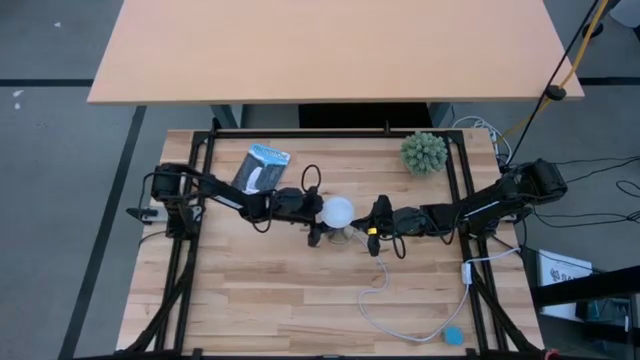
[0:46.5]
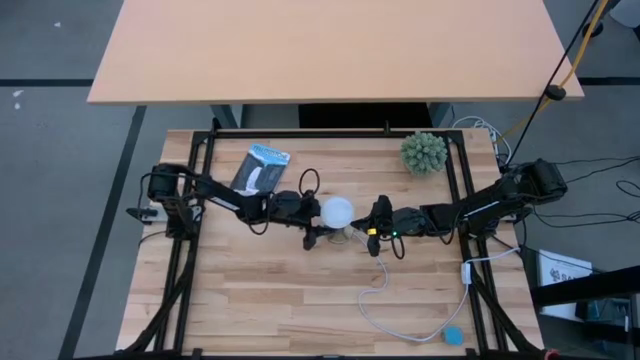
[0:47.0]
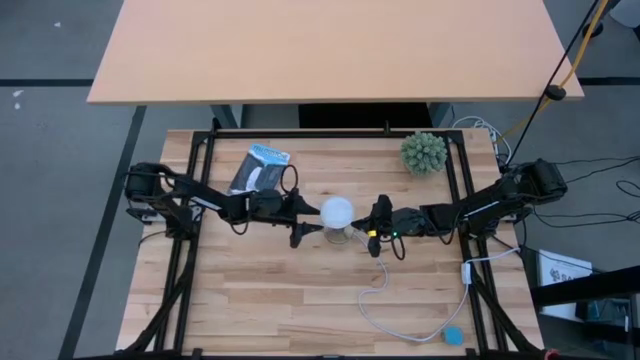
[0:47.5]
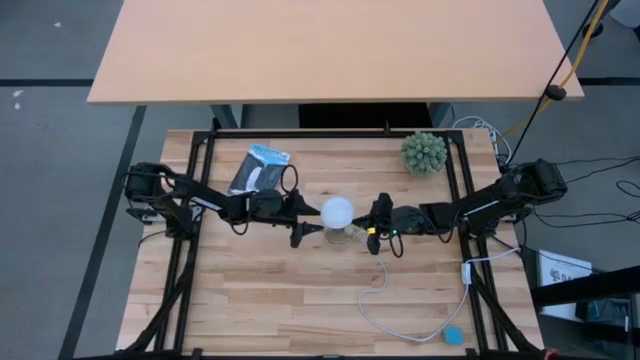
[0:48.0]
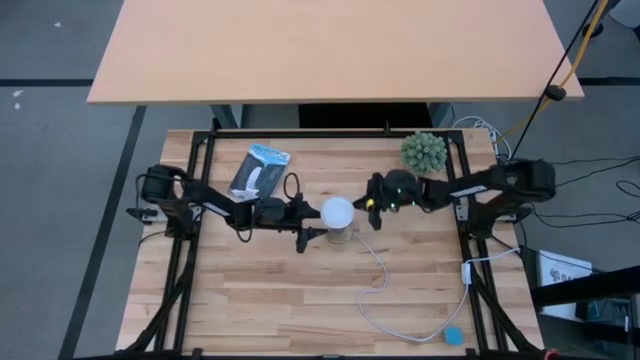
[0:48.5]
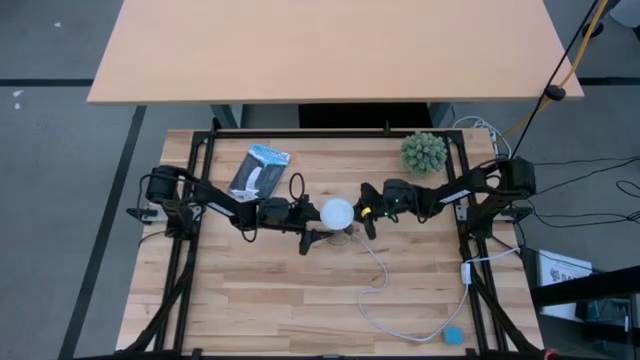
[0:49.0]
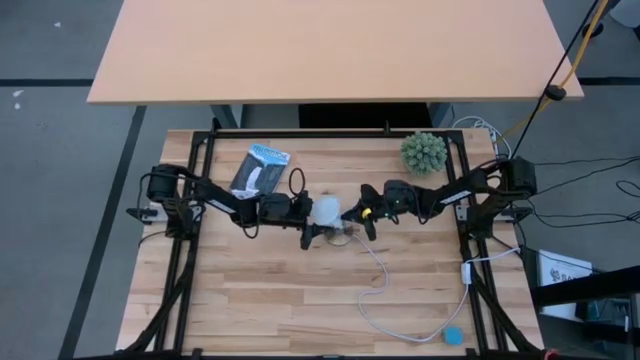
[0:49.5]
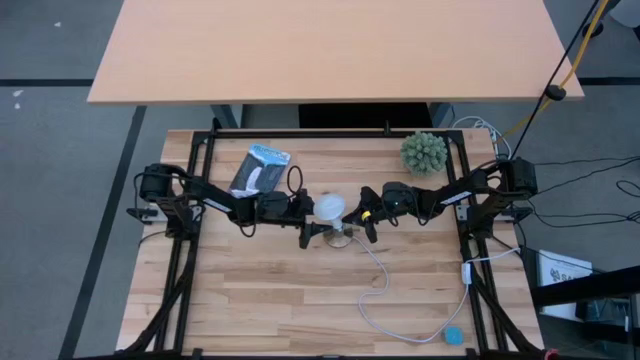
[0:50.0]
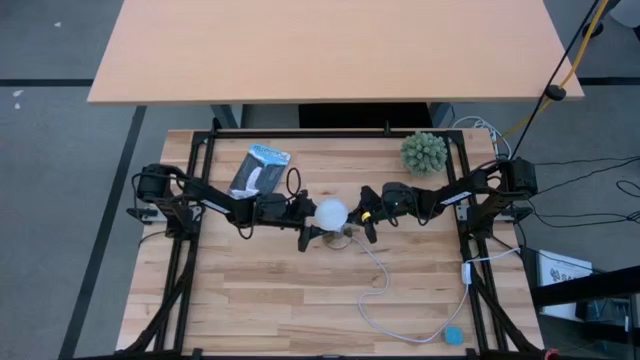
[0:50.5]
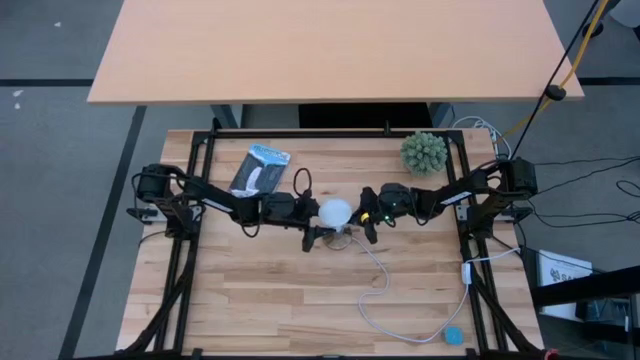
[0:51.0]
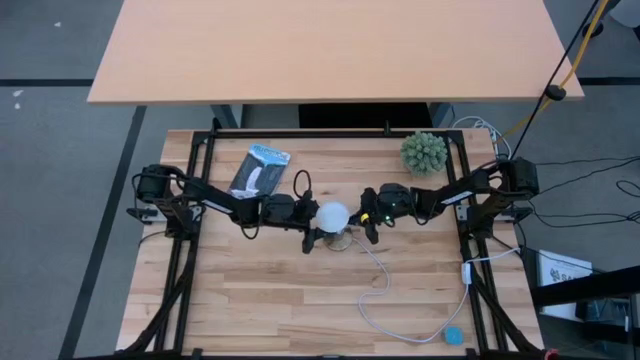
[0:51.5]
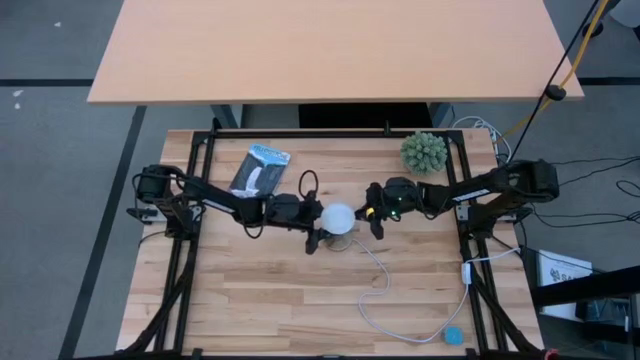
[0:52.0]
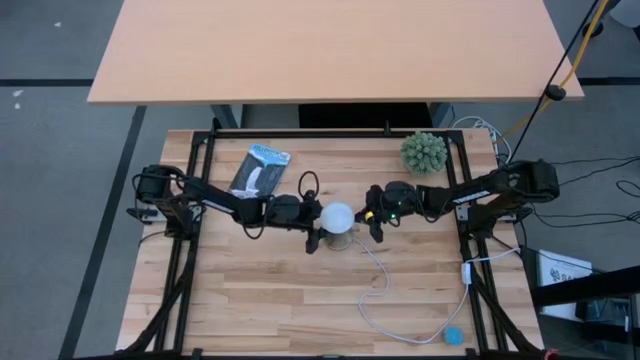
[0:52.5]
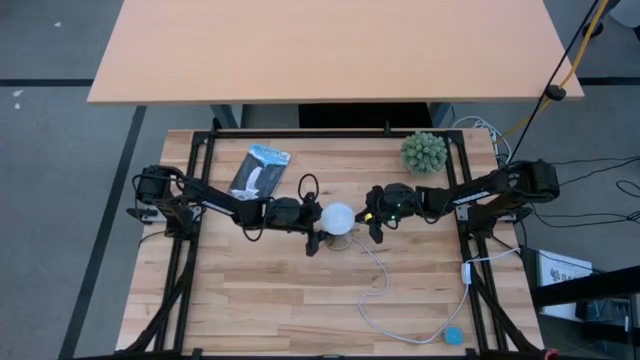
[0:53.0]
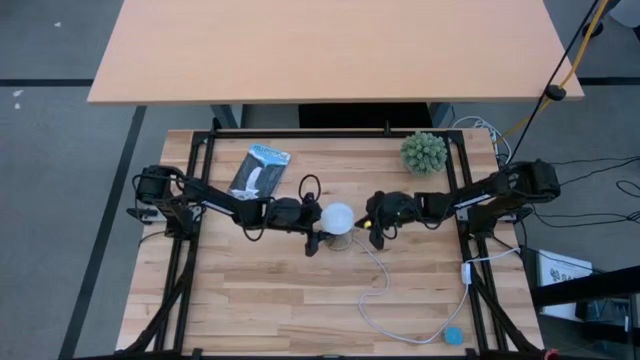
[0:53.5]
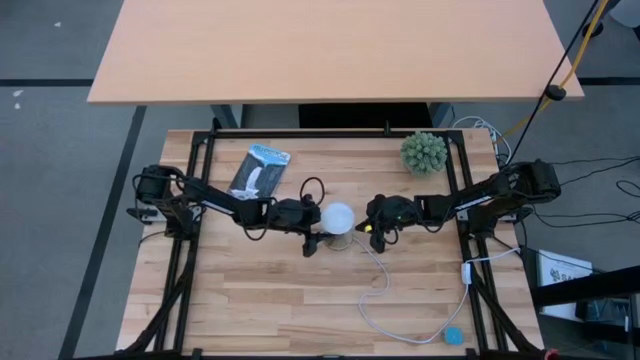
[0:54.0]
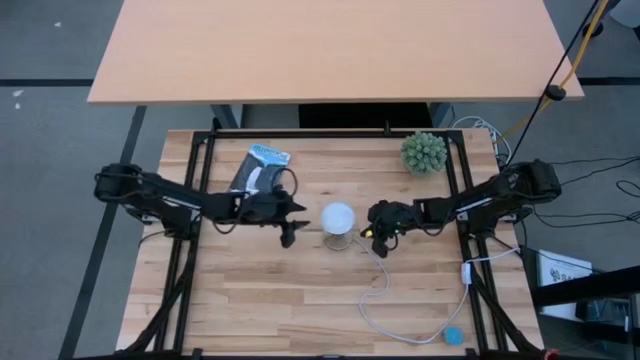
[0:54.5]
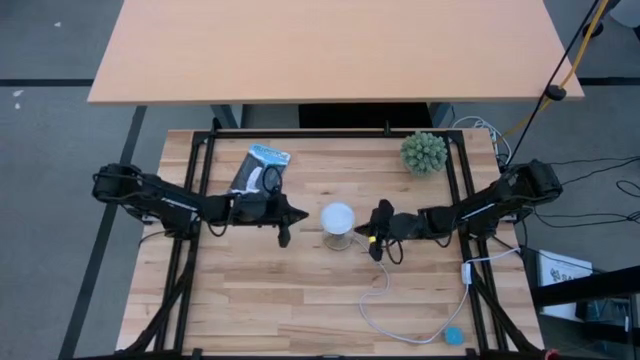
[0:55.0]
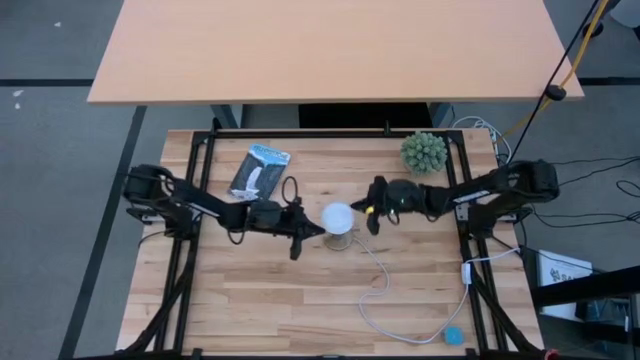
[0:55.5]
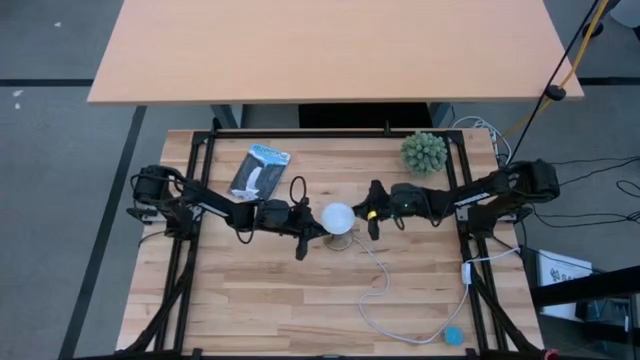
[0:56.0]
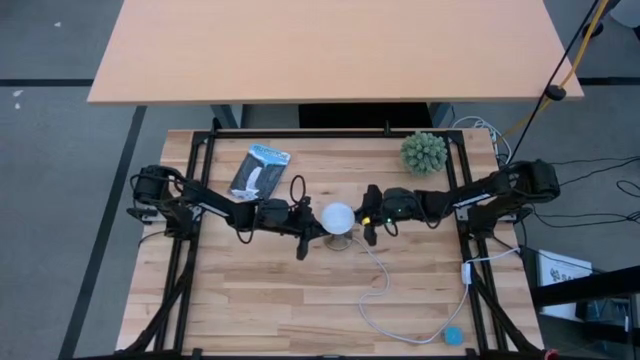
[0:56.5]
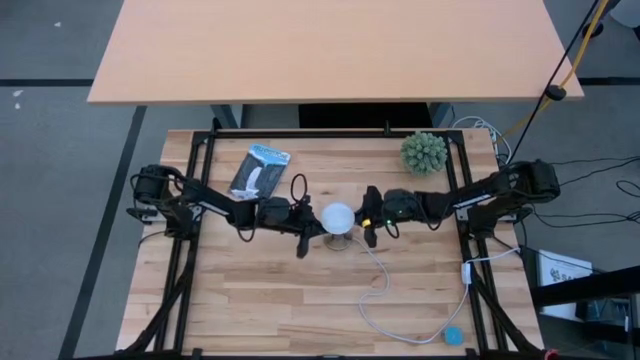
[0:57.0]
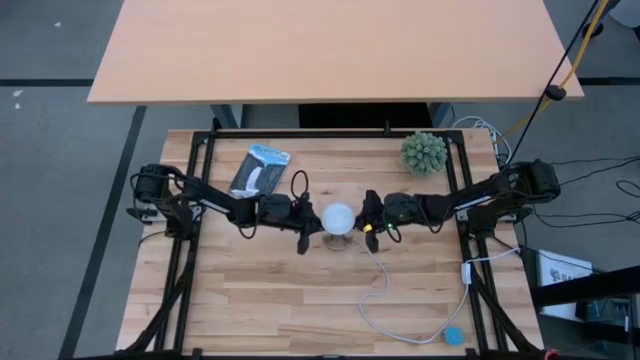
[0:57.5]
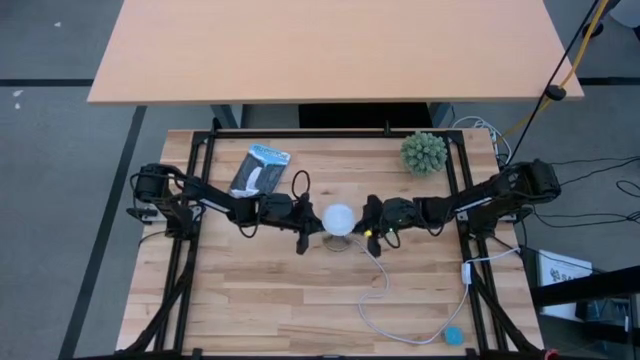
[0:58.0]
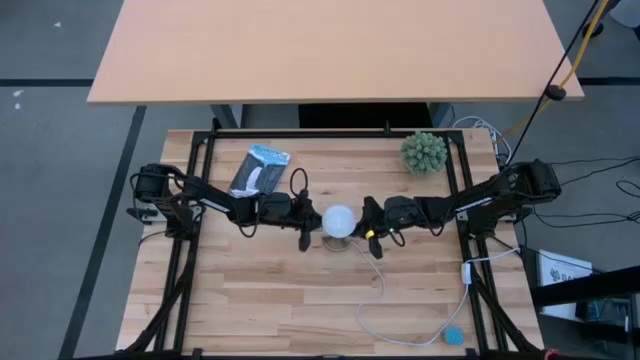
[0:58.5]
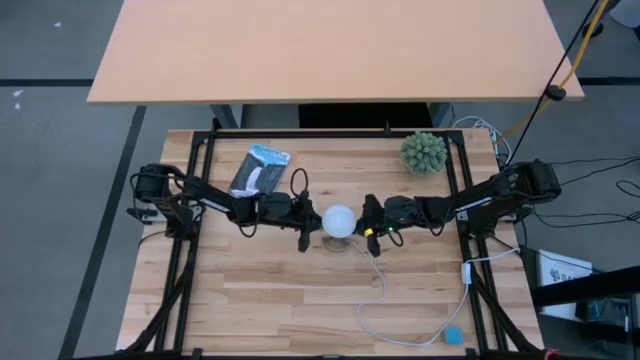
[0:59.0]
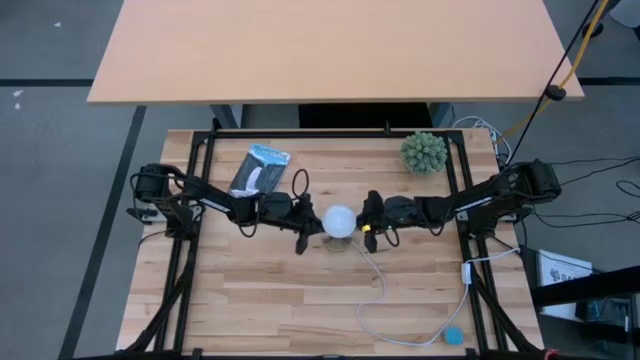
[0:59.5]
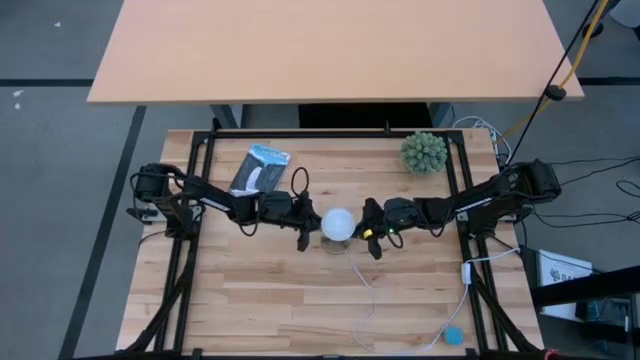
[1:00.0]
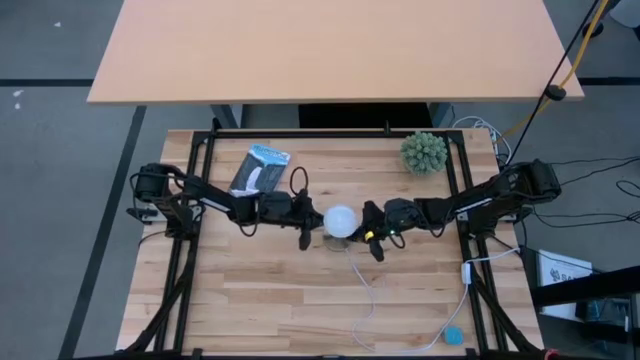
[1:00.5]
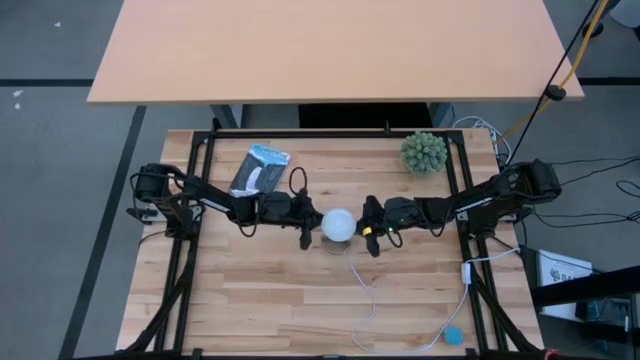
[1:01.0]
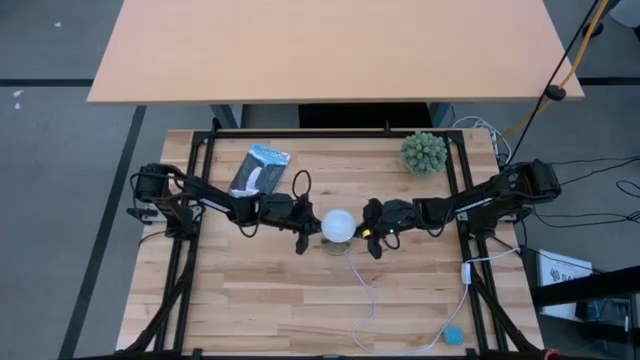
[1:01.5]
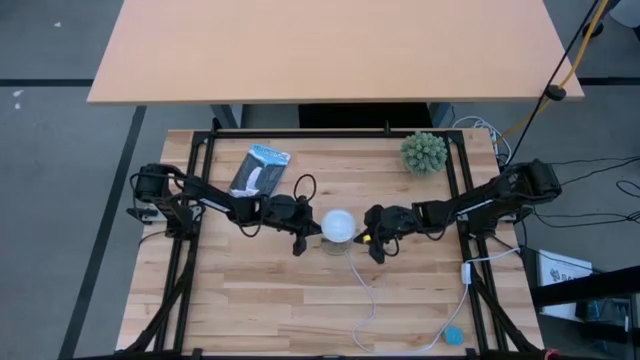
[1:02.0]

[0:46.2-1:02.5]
Task: Screw lightbulb
Insert the white lightbulb into the gold lamp

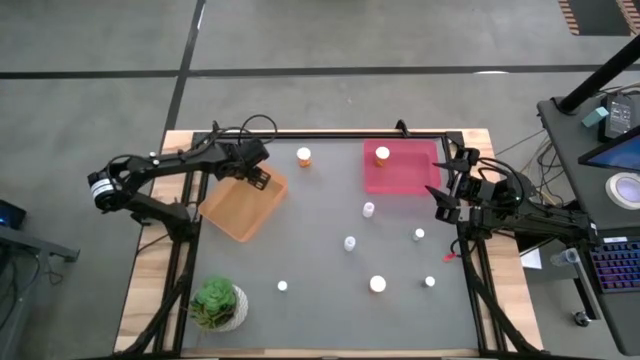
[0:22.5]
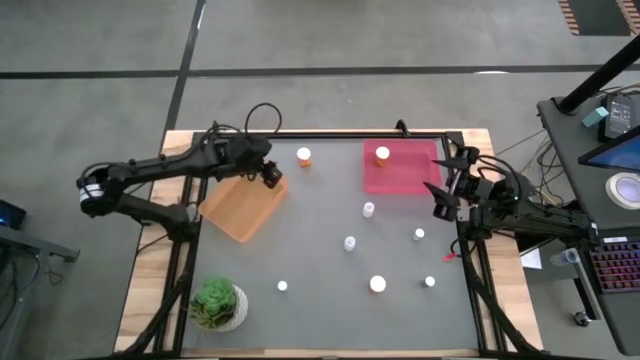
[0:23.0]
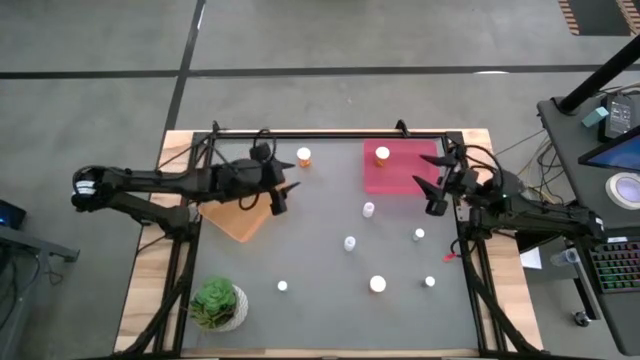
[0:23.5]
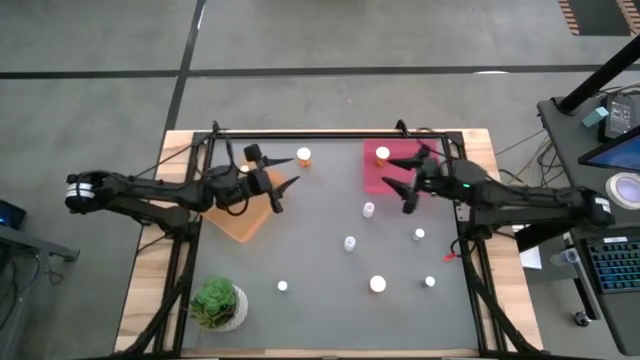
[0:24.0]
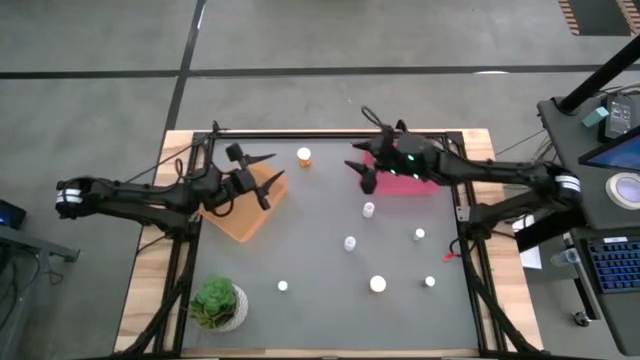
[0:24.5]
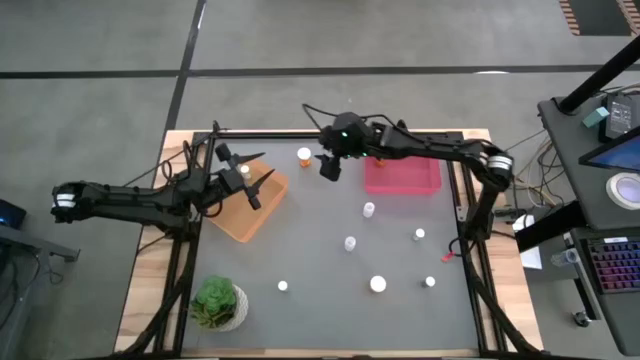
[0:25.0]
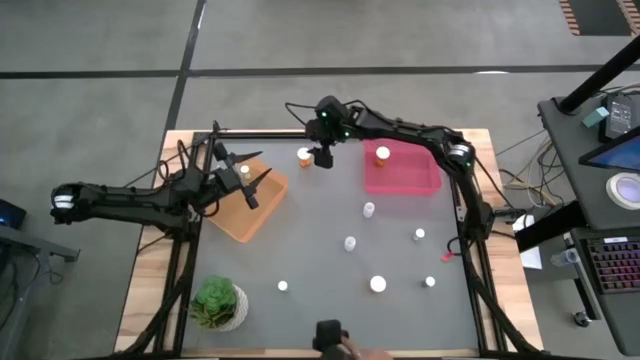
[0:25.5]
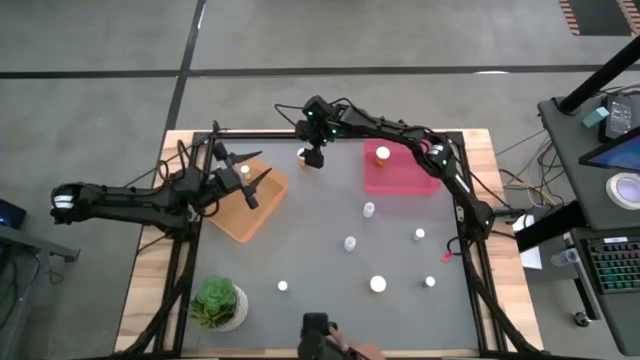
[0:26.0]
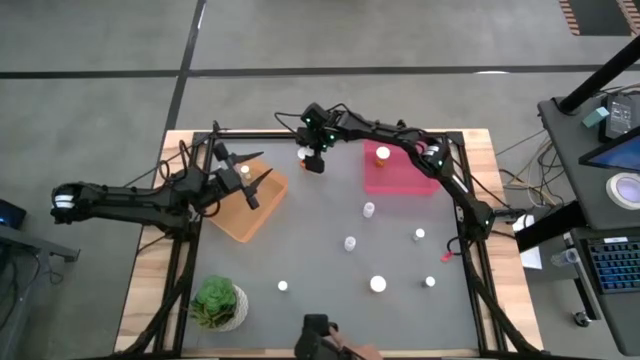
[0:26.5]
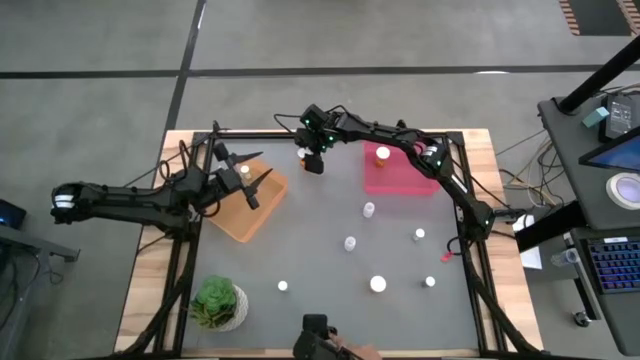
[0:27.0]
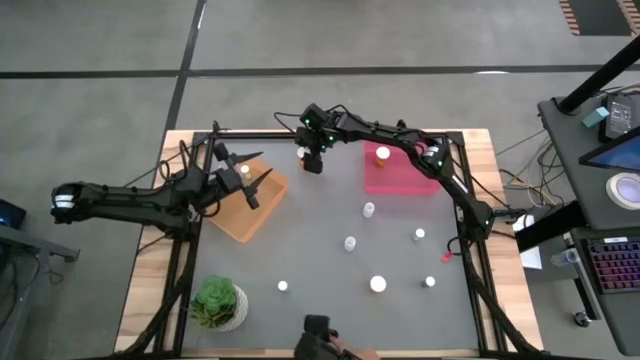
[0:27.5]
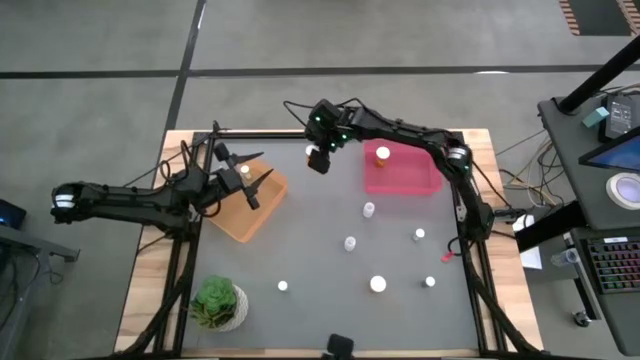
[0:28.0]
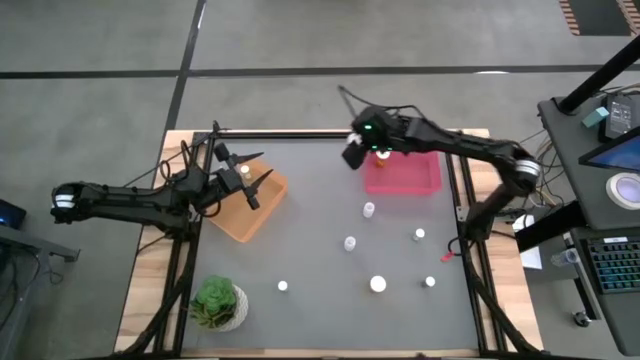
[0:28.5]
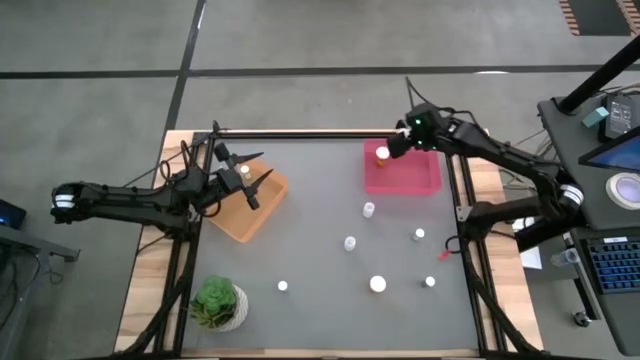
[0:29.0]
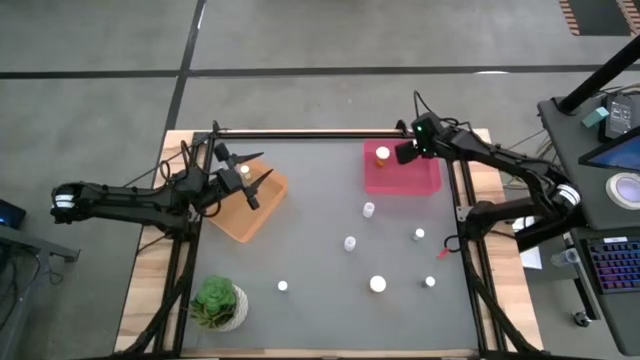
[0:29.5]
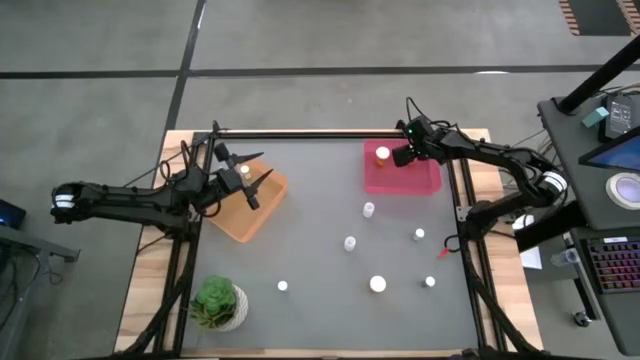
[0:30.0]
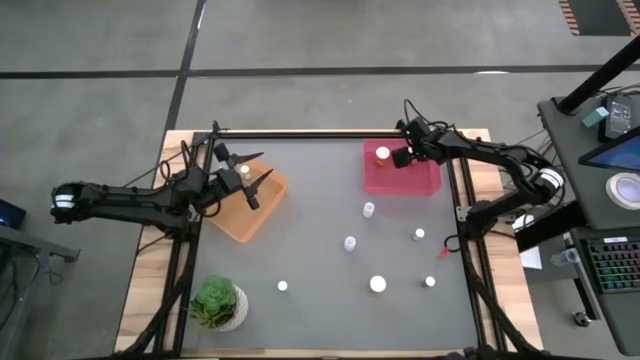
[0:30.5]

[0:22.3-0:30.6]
Task: Pick and place medicine bottles into bin by pill shape (circle, oval)
Put the orange capsule bottle into the pink bin
